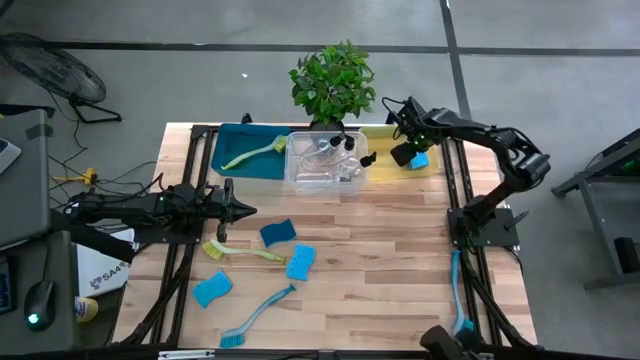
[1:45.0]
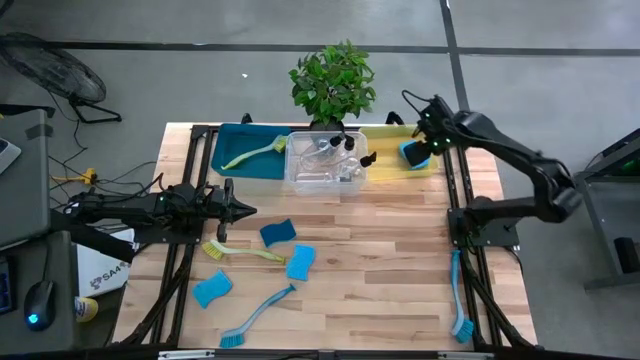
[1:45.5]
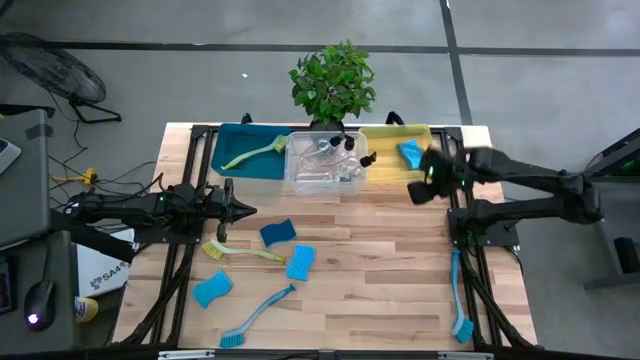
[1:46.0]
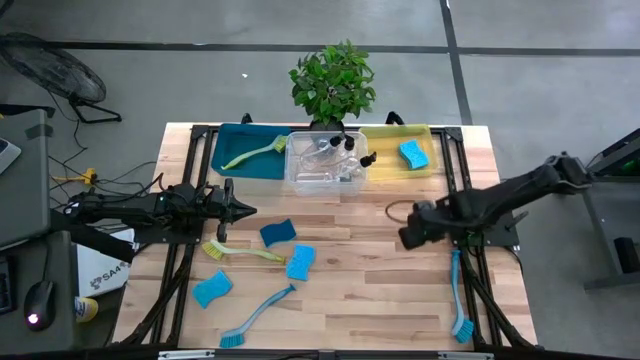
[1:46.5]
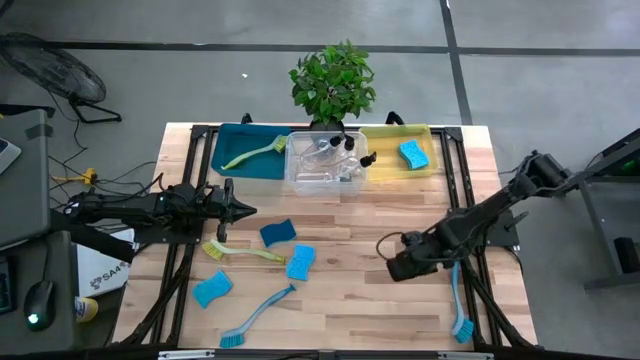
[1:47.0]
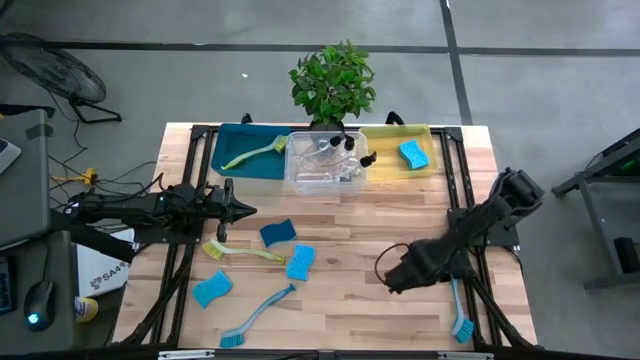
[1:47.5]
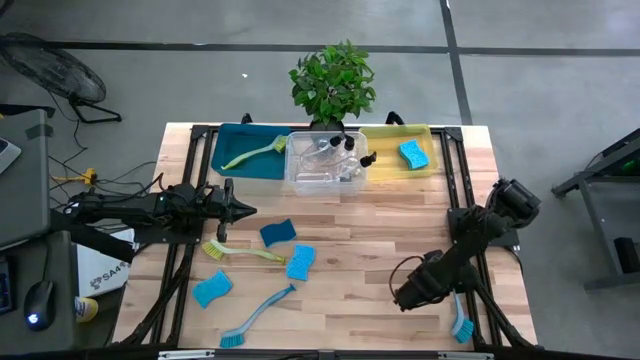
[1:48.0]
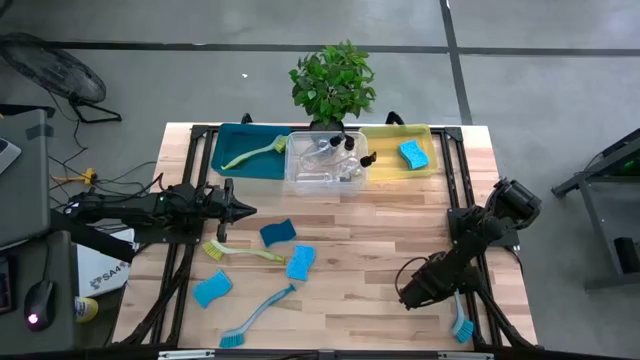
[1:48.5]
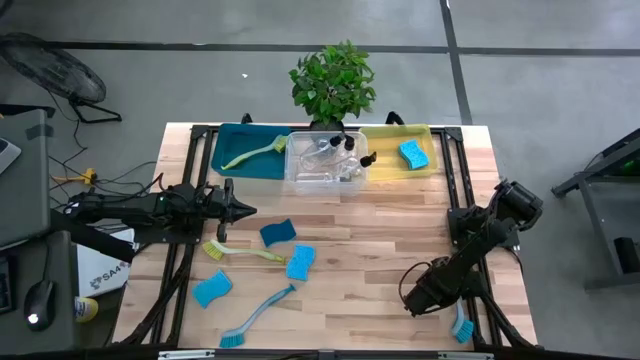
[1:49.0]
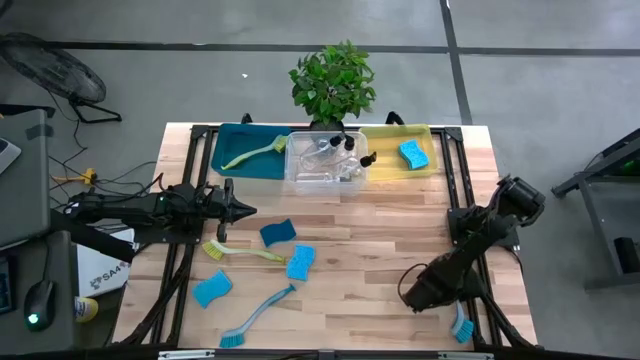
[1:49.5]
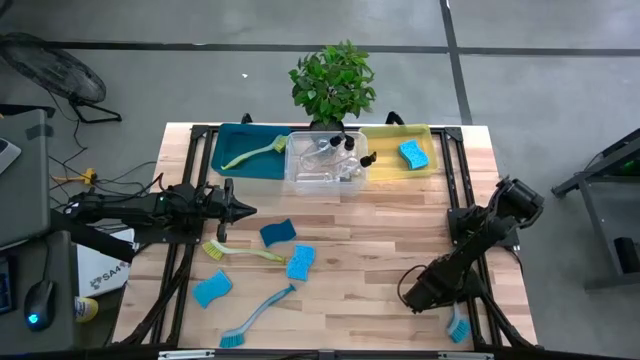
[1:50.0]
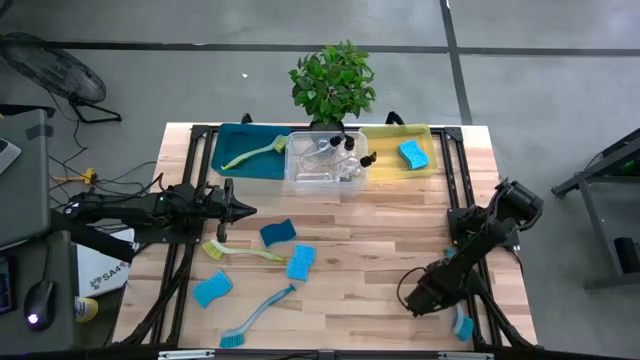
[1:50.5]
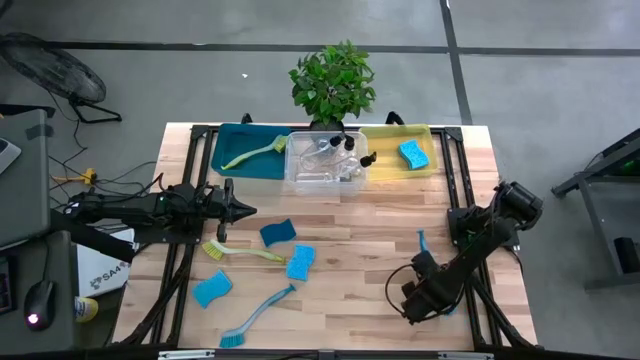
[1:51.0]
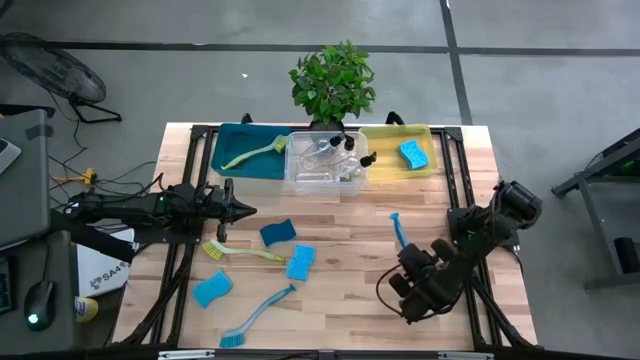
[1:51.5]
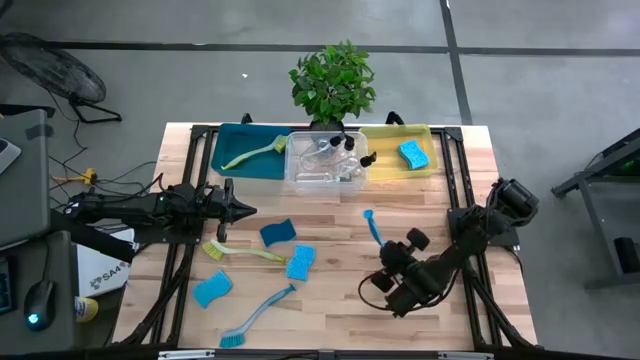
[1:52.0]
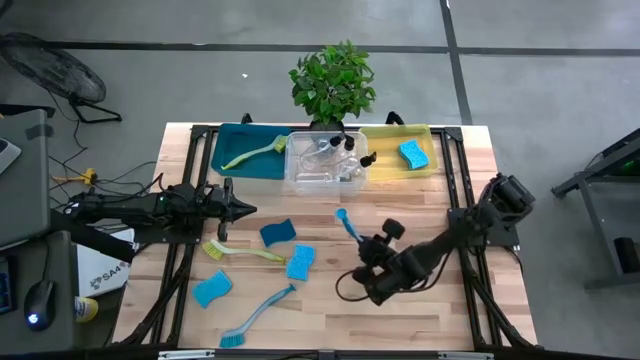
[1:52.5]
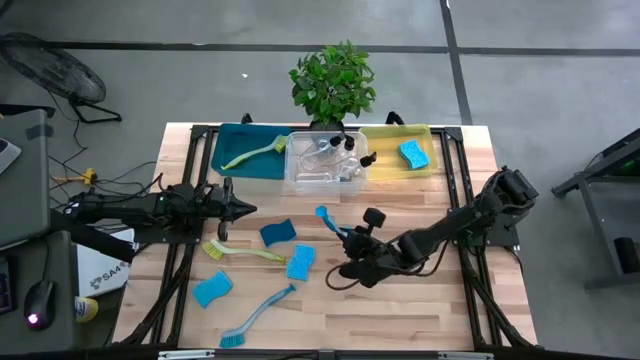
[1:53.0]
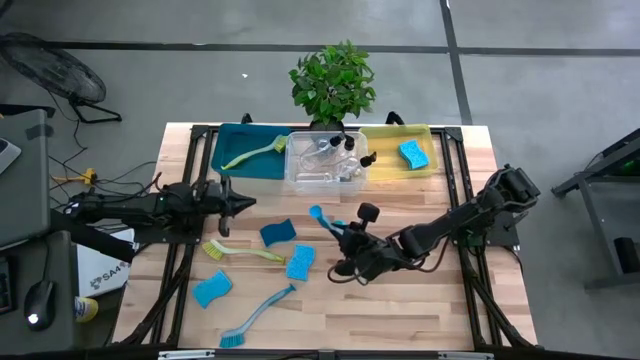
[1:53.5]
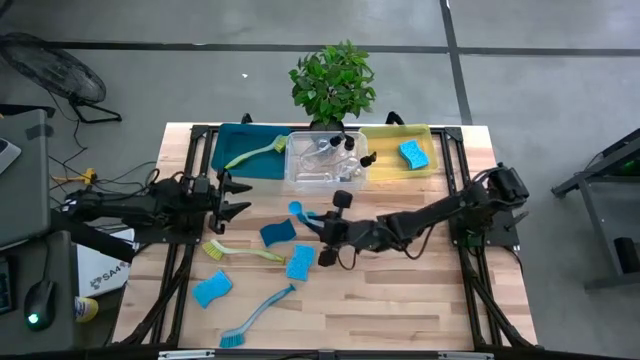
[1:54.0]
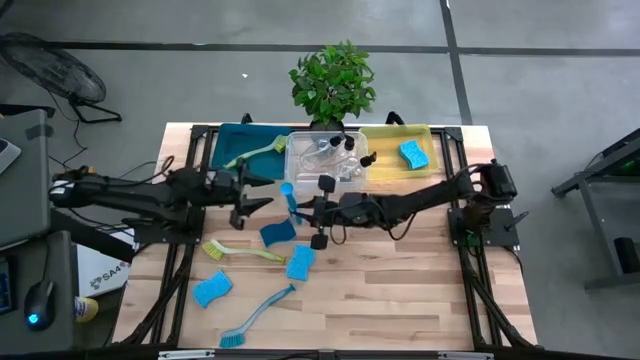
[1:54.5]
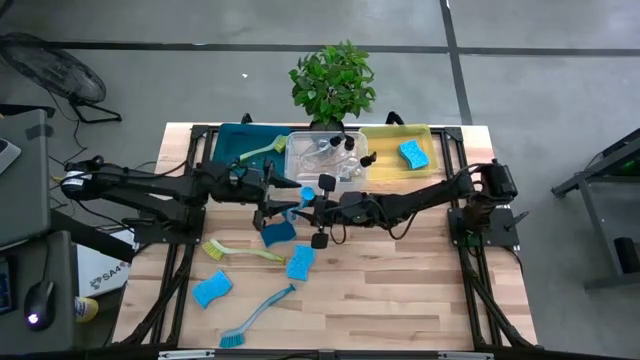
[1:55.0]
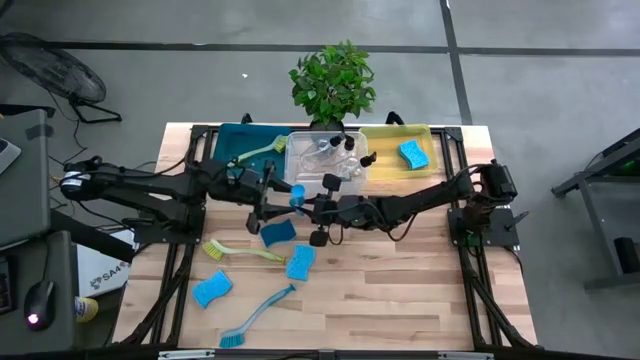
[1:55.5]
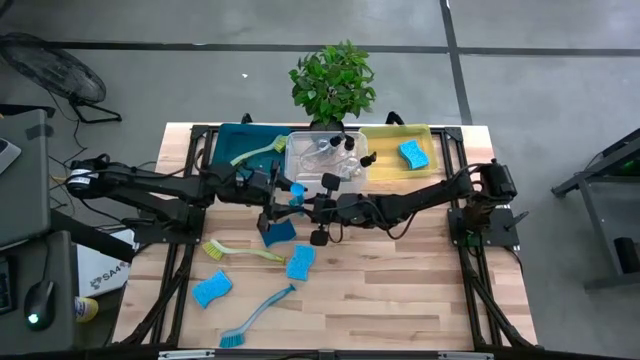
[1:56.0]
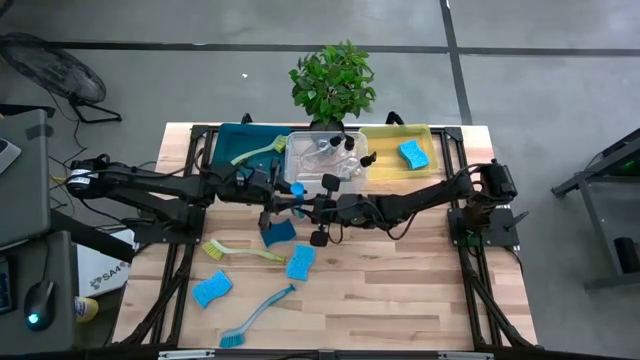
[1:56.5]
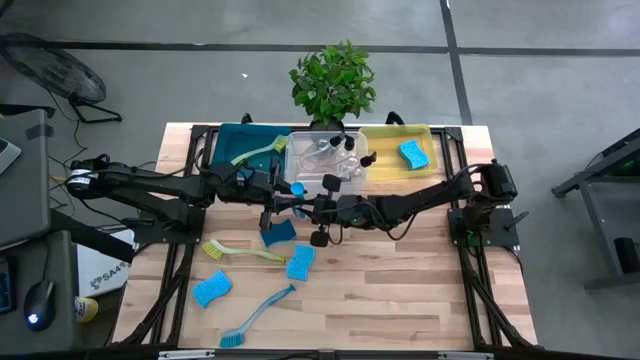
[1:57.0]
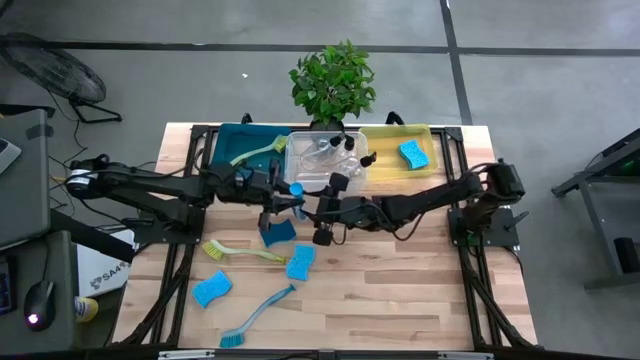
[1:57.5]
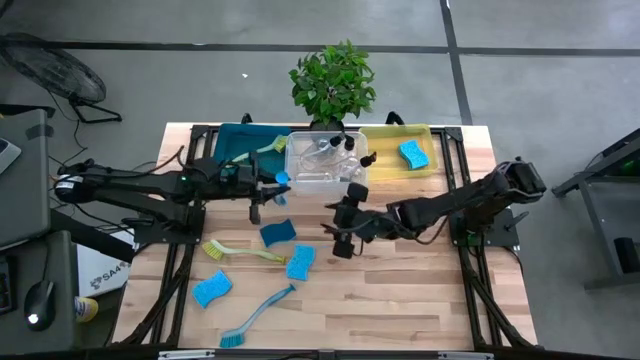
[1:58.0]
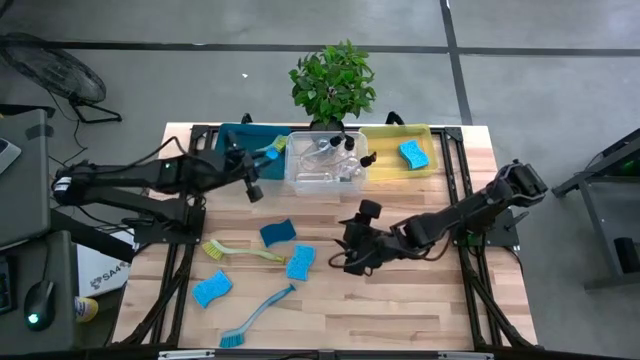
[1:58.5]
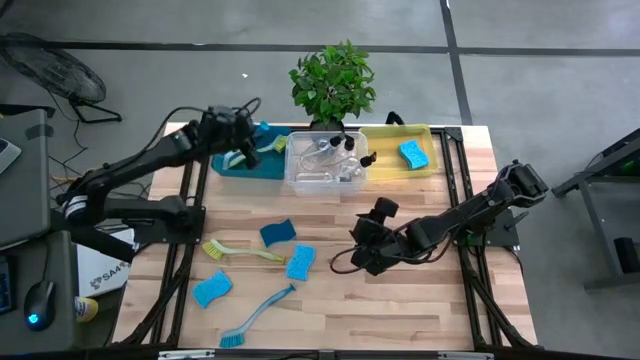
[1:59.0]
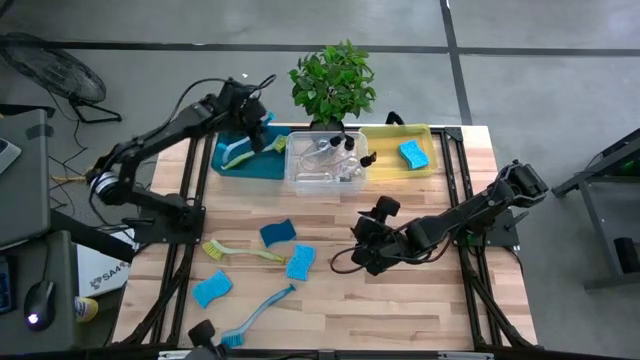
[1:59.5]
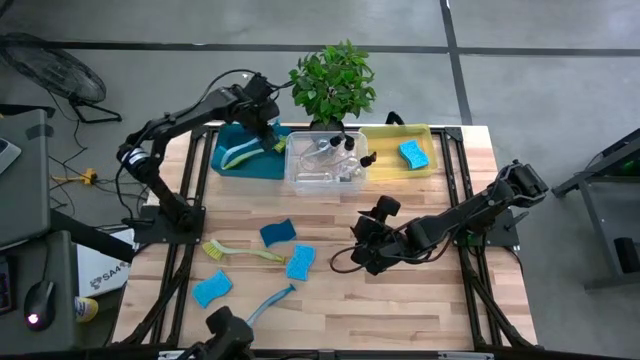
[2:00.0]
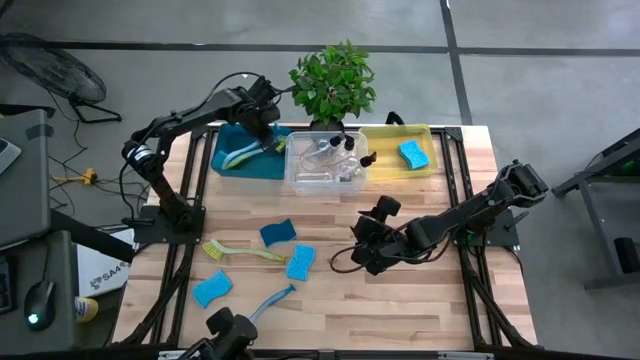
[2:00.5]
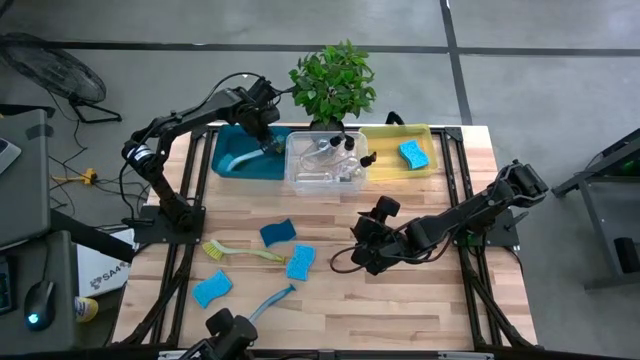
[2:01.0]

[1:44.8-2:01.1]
Task: Pick & Place Kitchen Sink Supplies
Put the blue dish brush into the blue bin

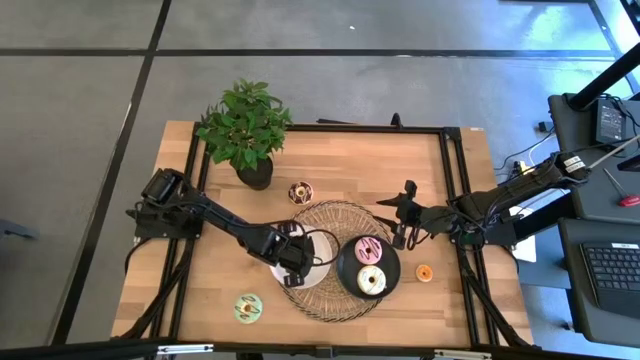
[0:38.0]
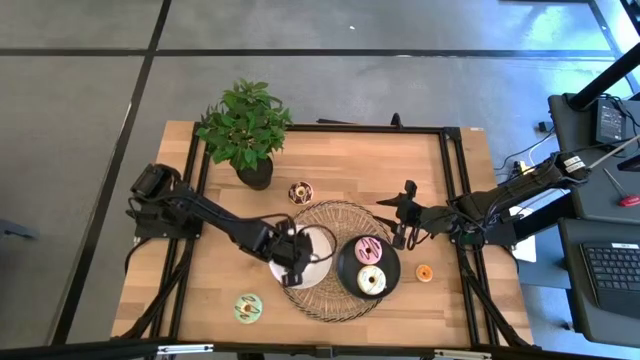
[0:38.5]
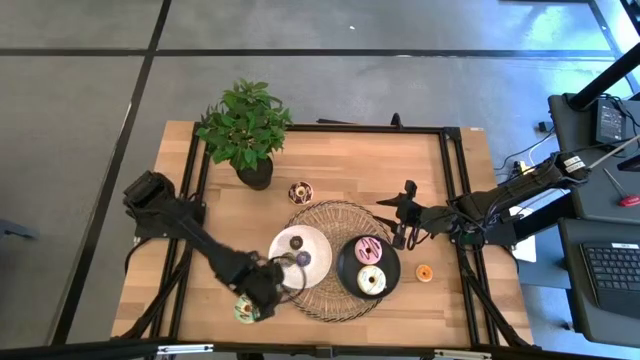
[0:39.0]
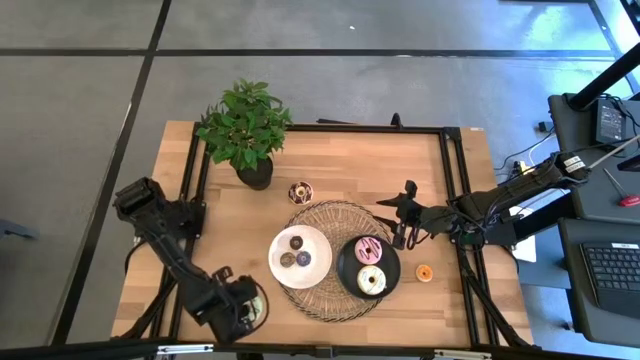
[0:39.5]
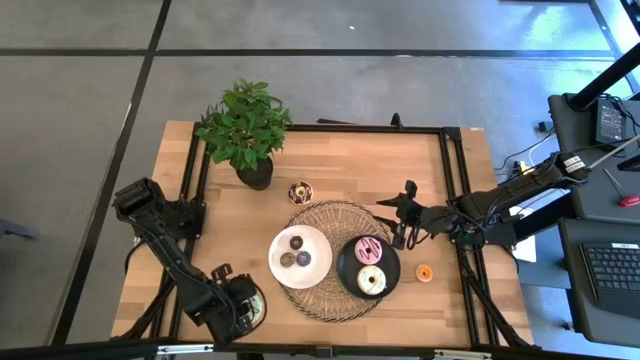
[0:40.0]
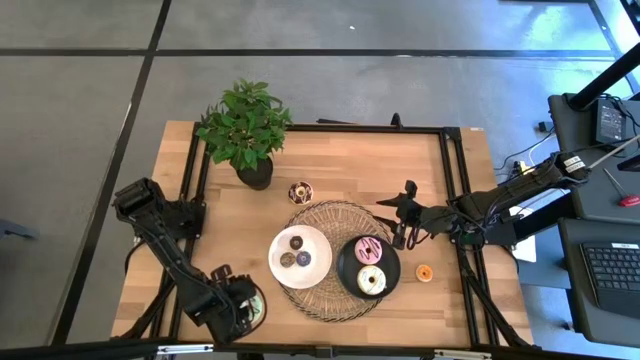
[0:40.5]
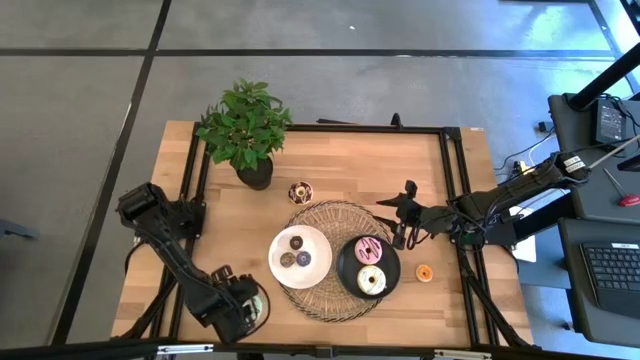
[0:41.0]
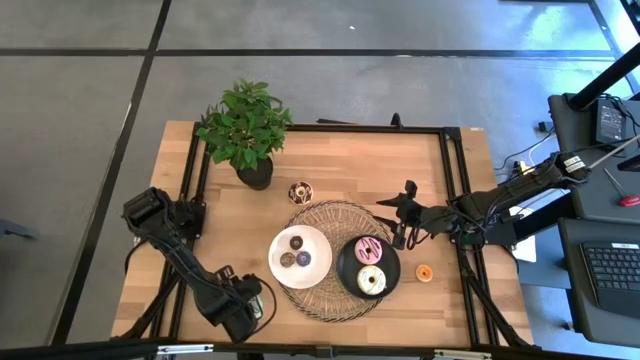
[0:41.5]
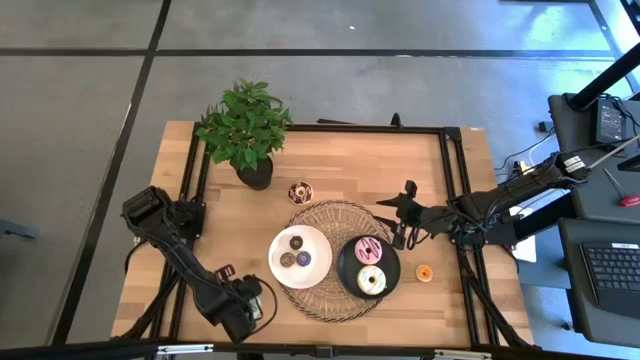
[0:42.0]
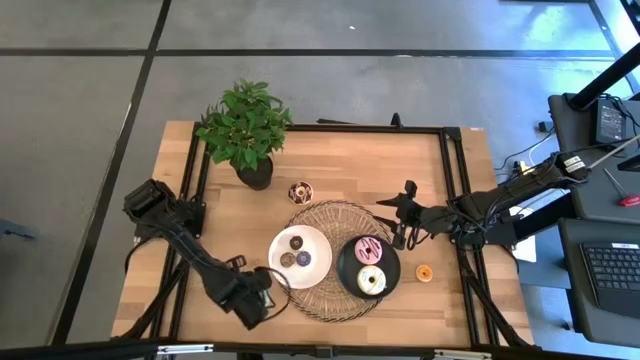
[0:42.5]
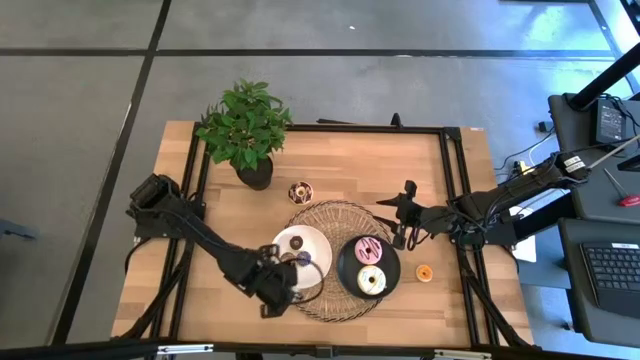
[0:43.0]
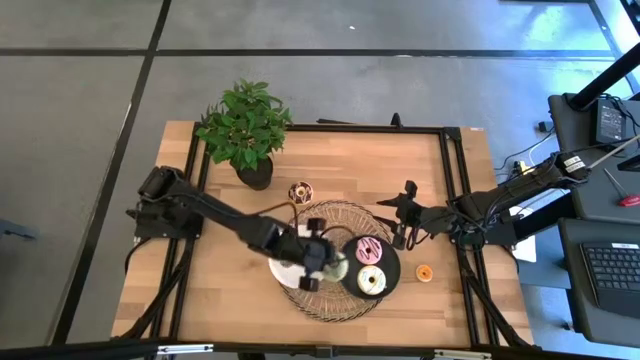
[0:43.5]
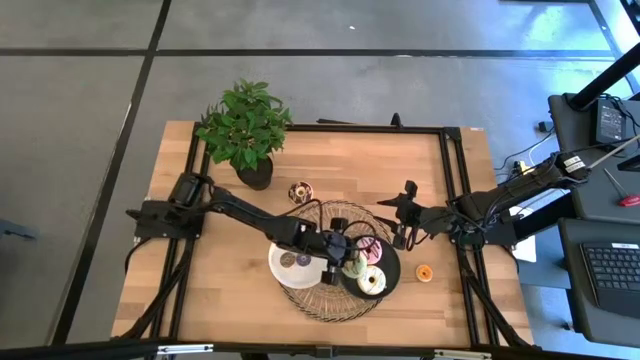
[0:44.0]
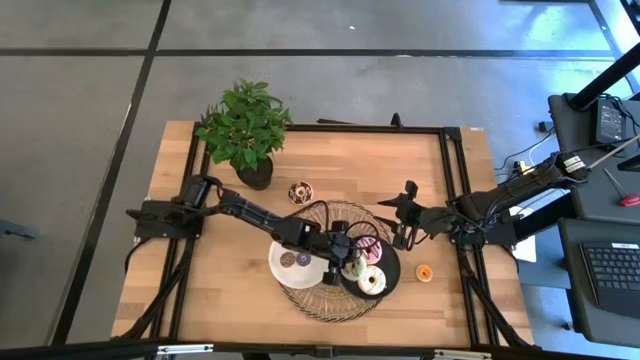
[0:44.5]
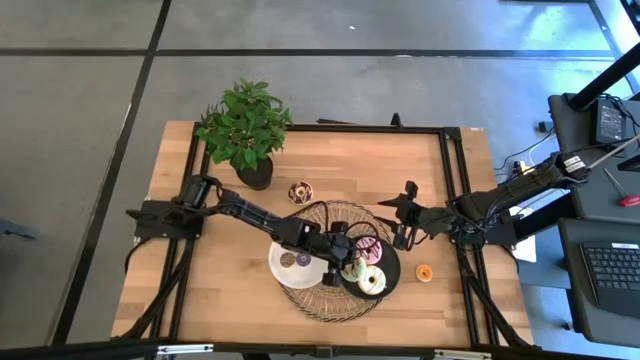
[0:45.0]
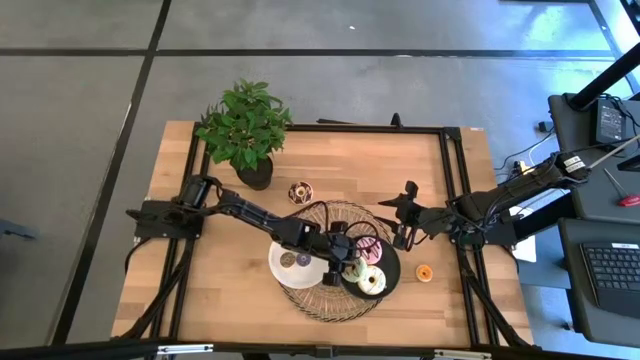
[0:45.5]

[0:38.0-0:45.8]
Task: Pick & Place donuts
Put the large light blue donut on the black plate
